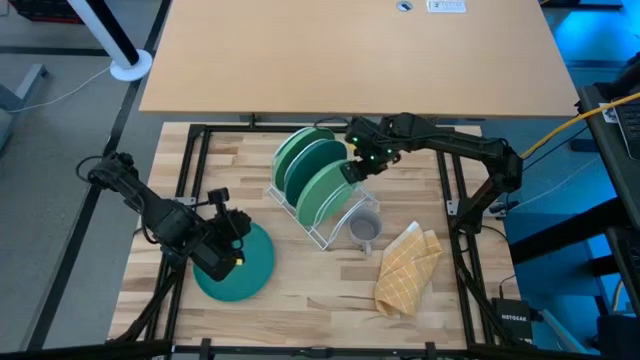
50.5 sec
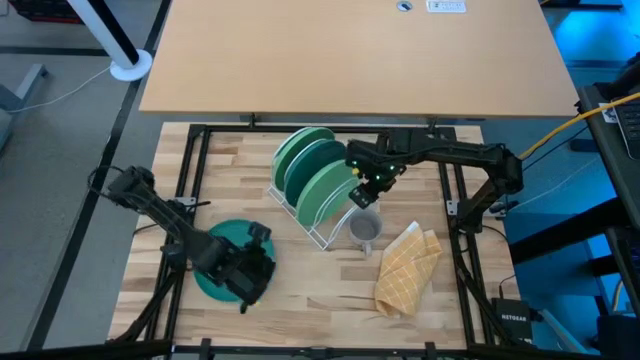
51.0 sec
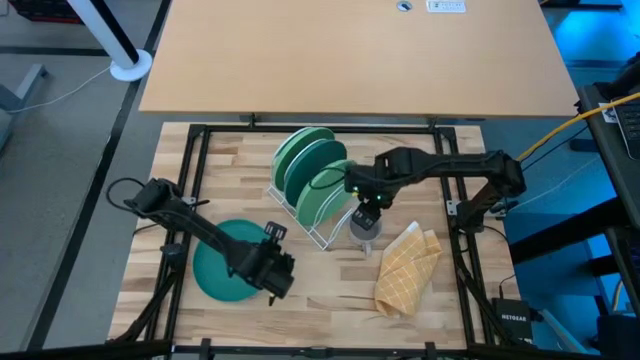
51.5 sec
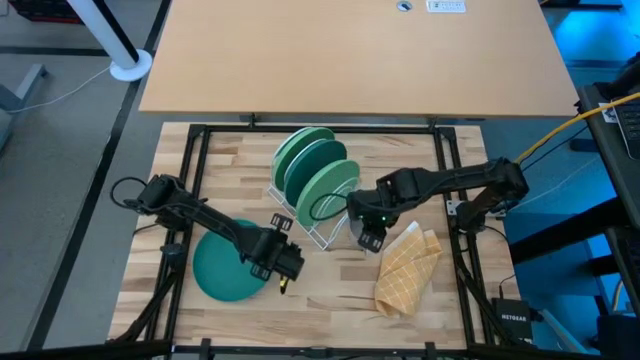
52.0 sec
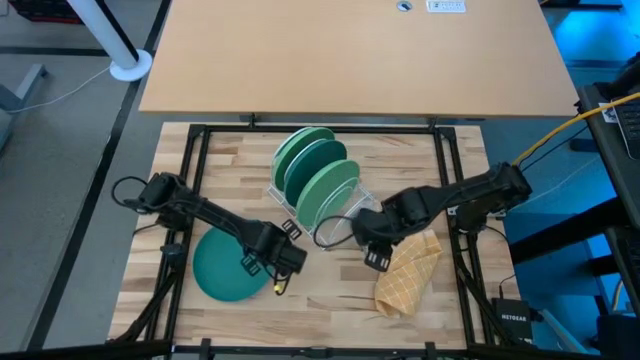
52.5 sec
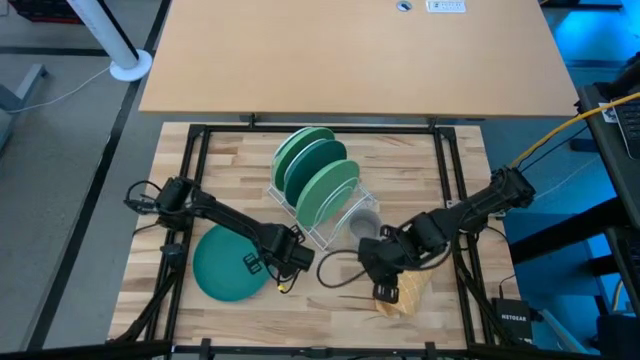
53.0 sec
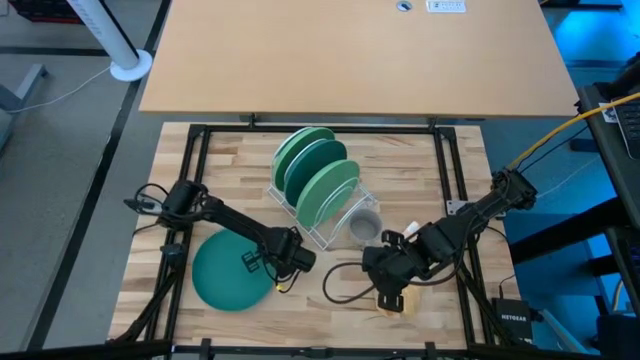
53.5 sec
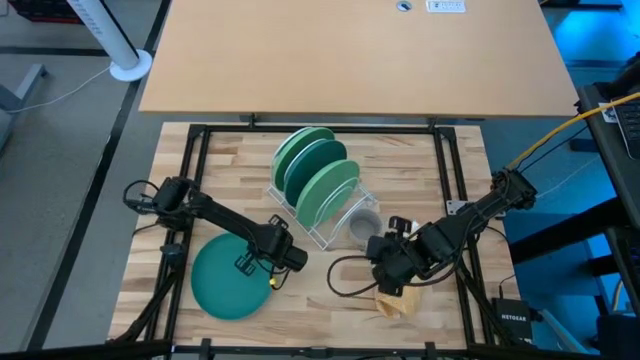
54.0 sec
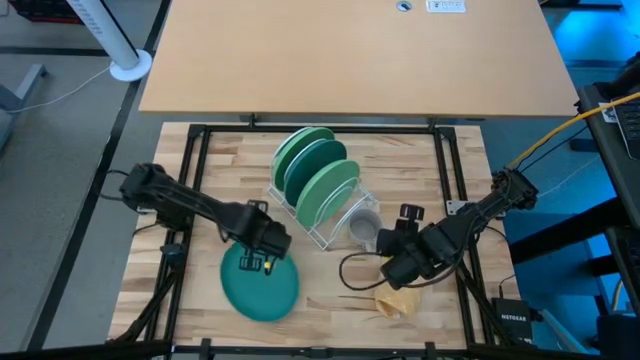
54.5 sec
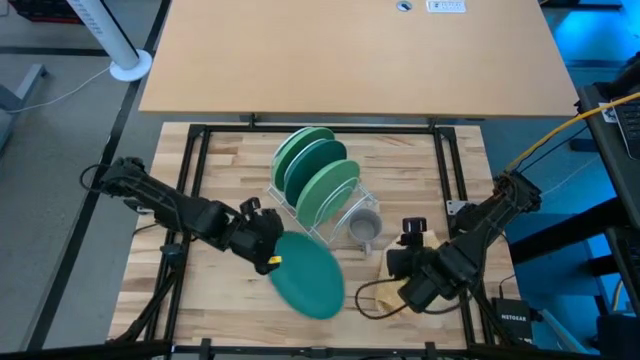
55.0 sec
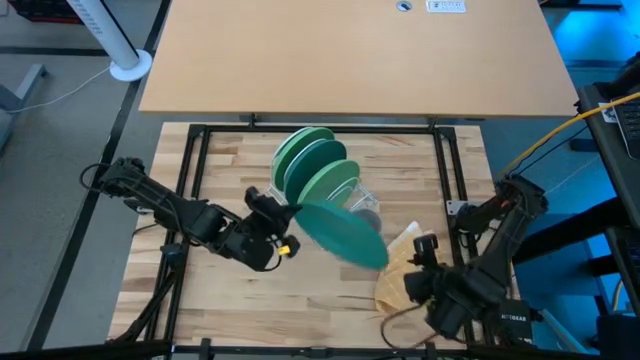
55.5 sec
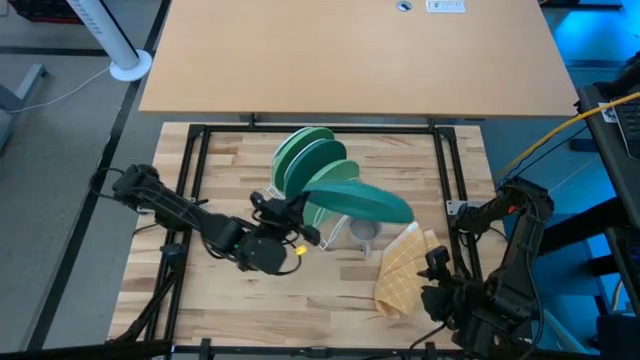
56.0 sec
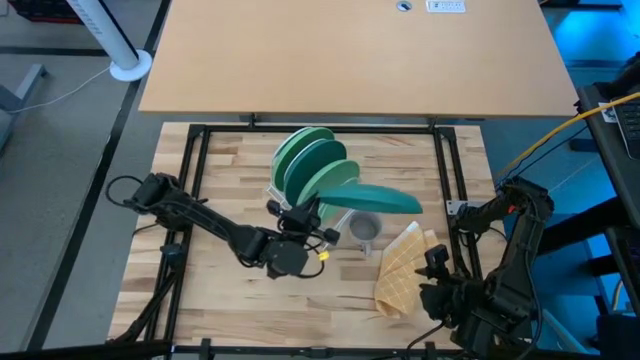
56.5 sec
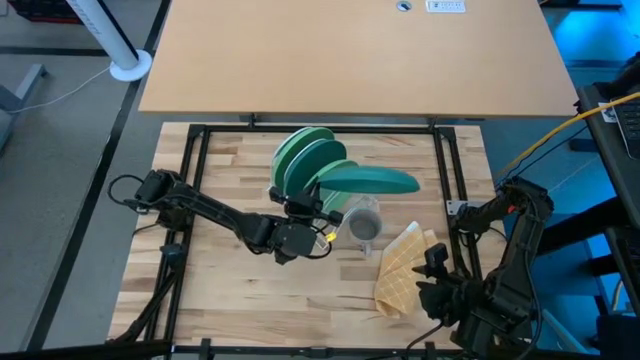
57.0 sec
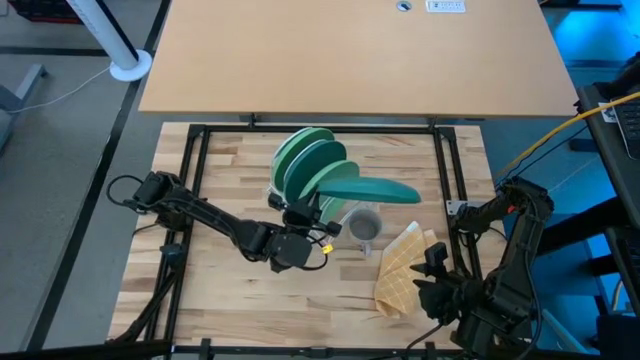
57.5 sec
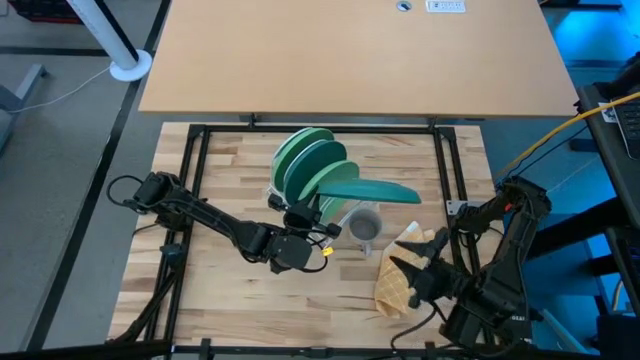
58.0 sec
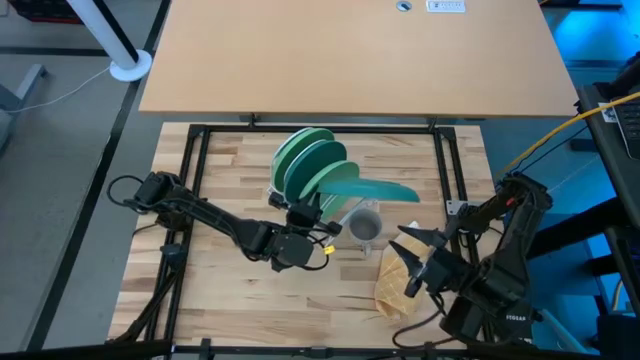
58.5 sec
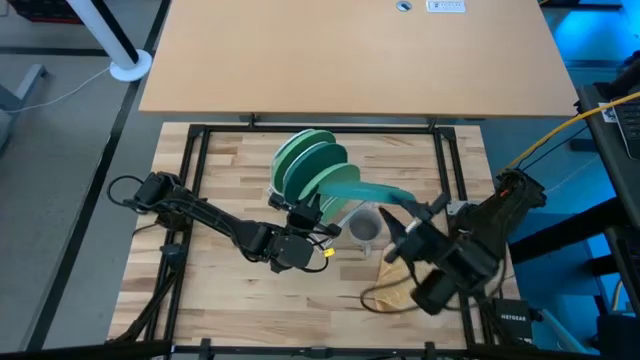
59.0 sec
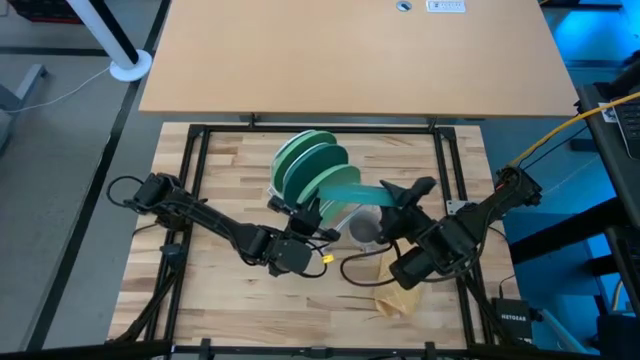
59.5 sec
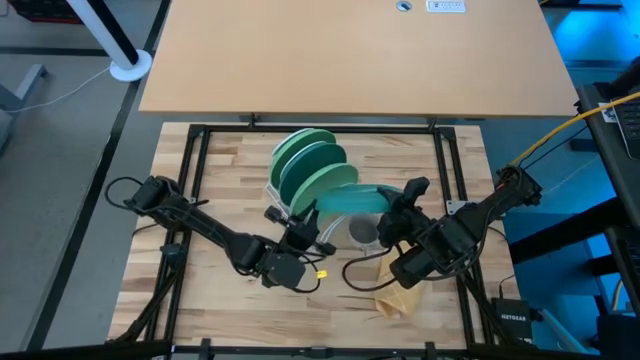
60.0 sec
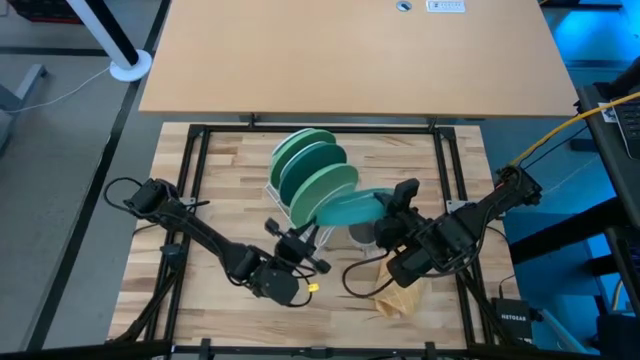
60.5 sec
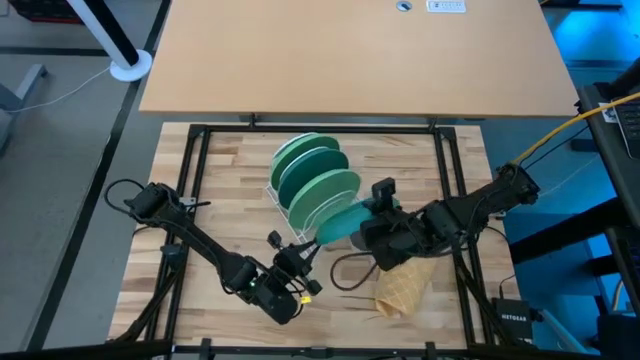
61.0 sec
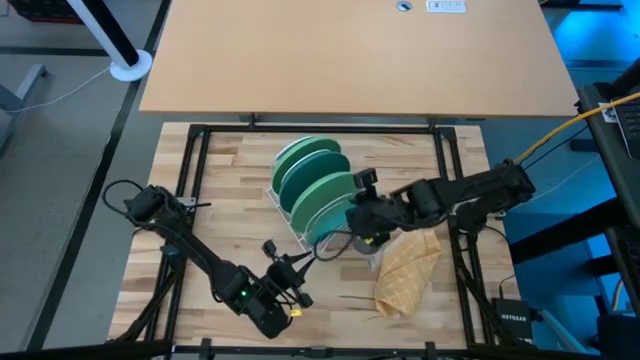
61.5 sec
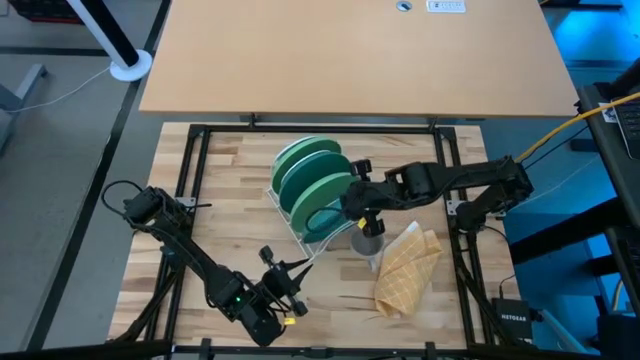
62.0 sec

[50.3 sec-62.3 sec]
Task: Sort dishes
Put the blue plate into the white dish rack

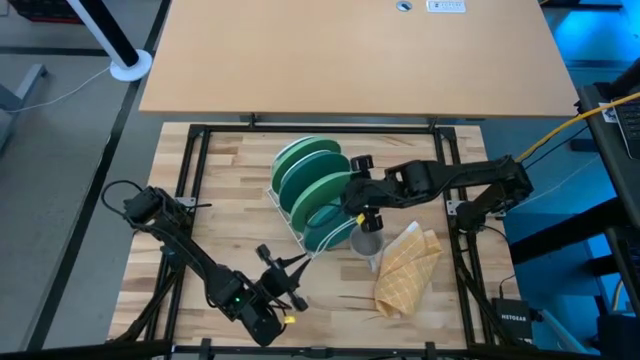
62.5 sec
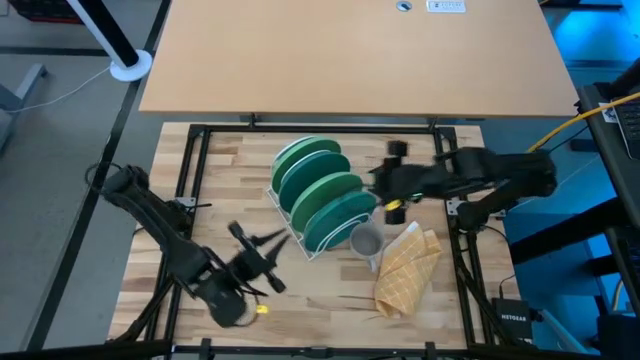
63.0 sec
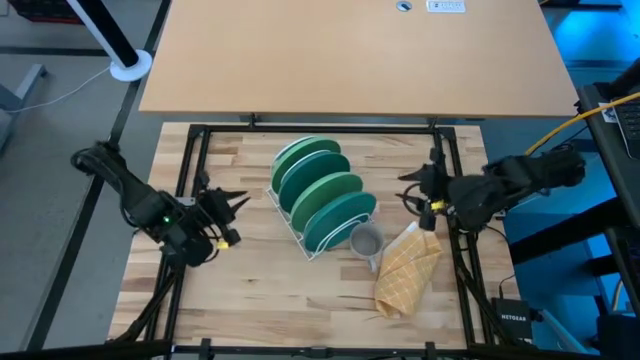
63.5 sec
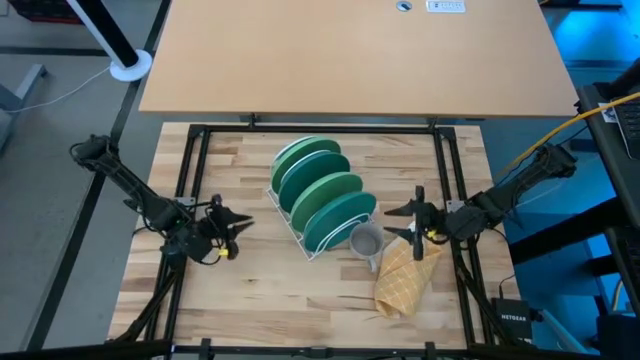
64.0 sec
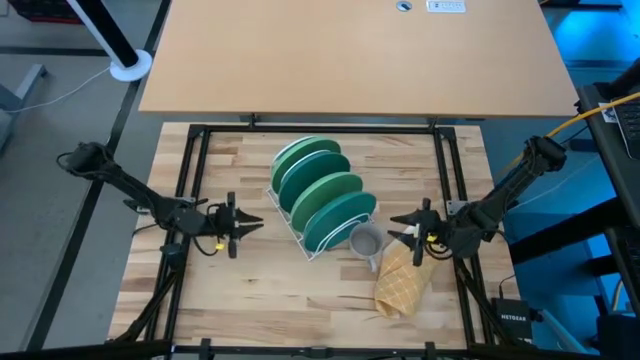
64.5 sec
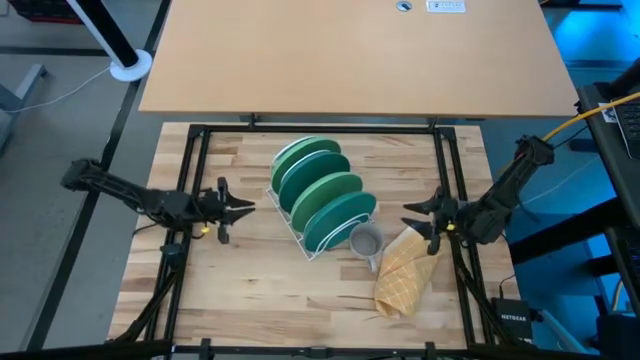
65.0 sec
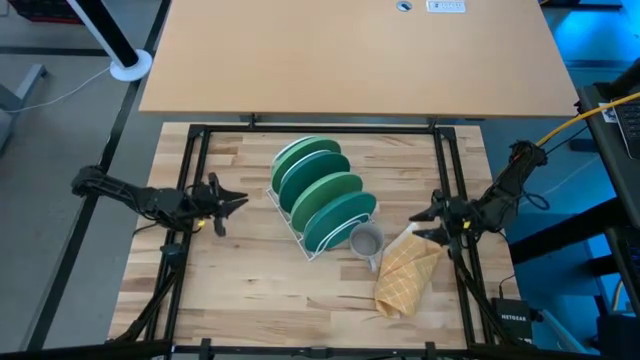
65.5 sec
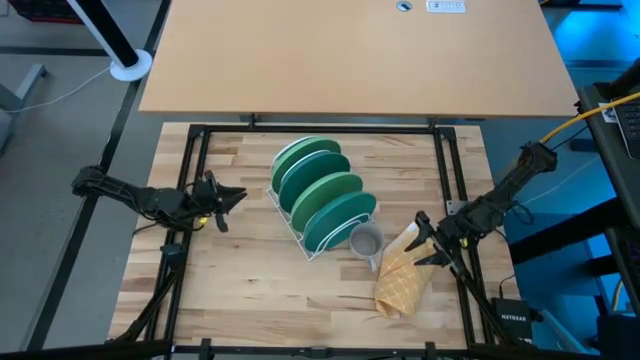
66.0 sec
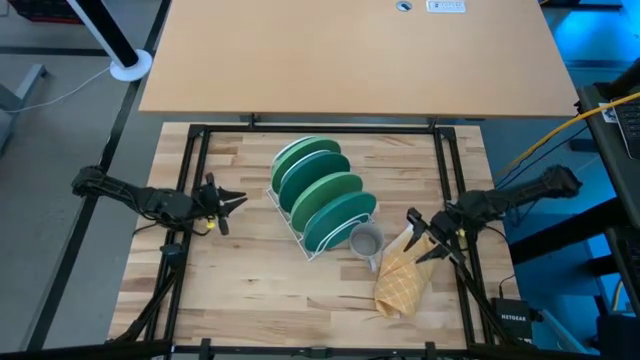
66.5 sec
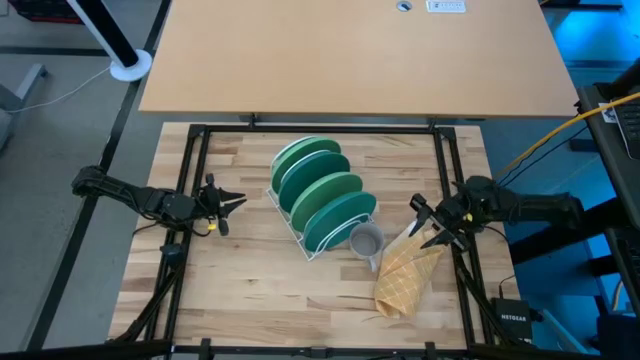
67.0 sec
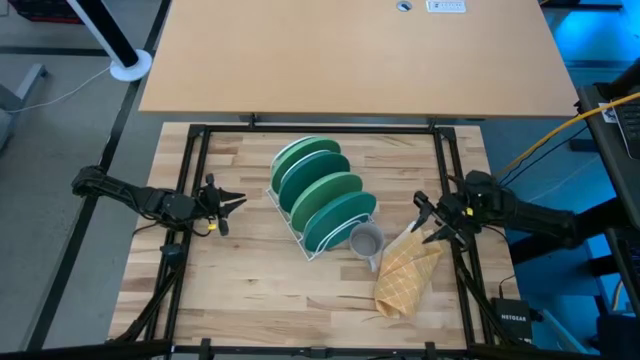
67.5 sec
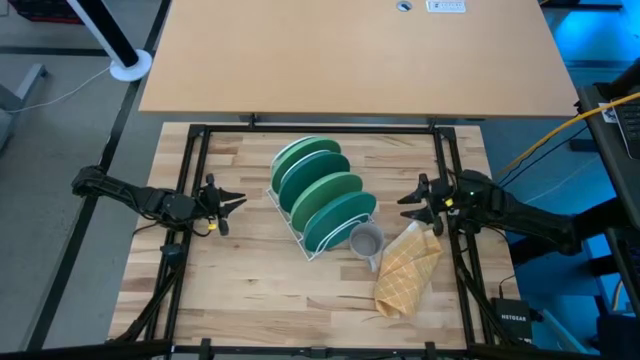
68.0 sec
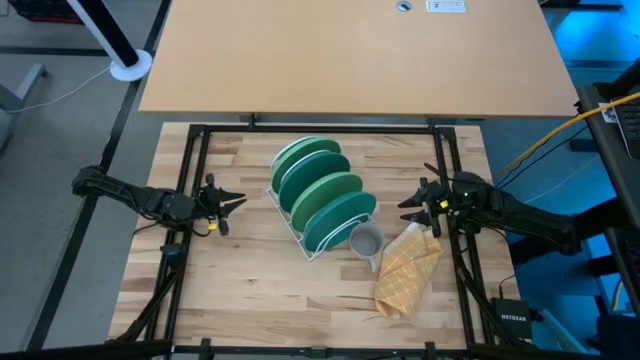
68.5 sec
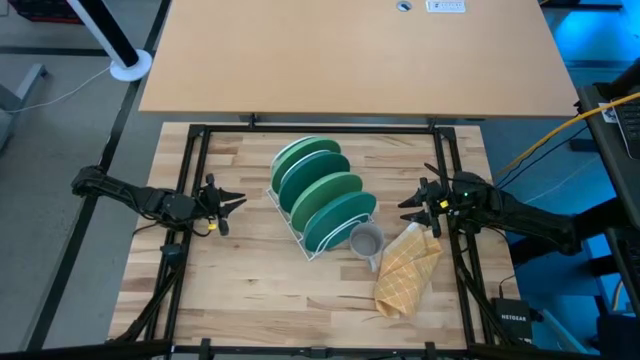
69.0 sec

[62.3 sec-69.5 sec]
Return to Home Position

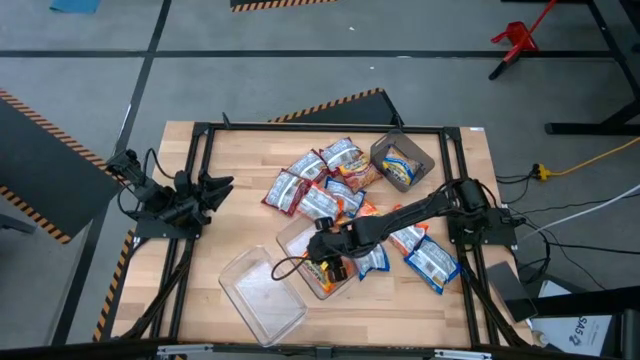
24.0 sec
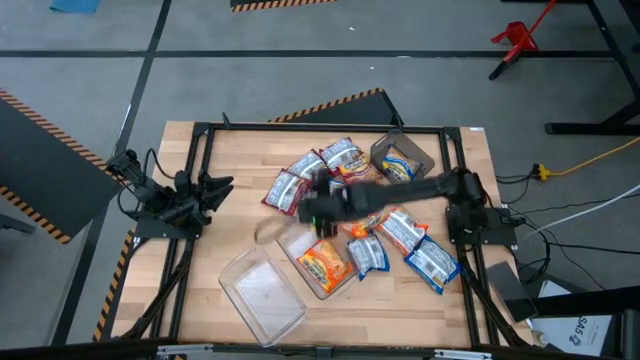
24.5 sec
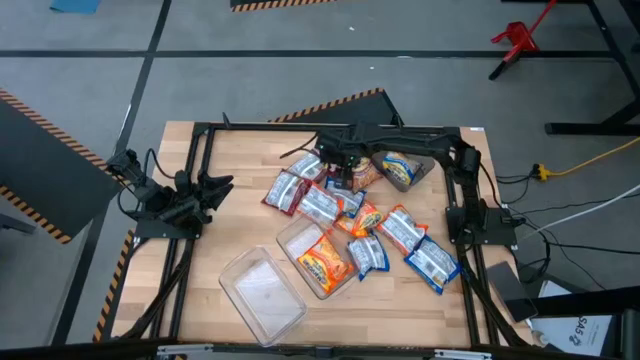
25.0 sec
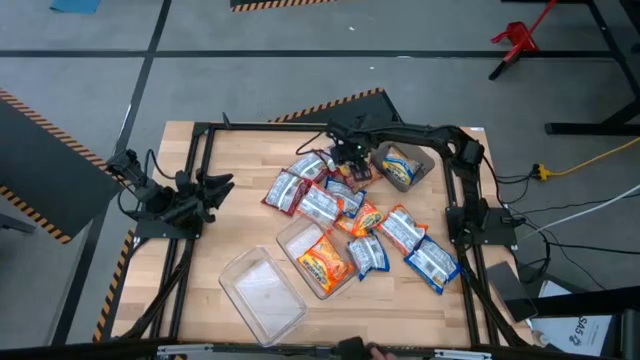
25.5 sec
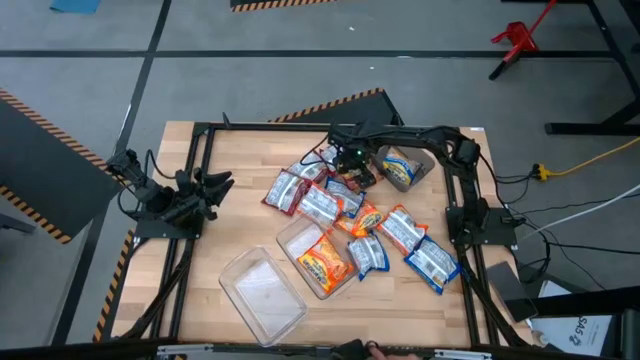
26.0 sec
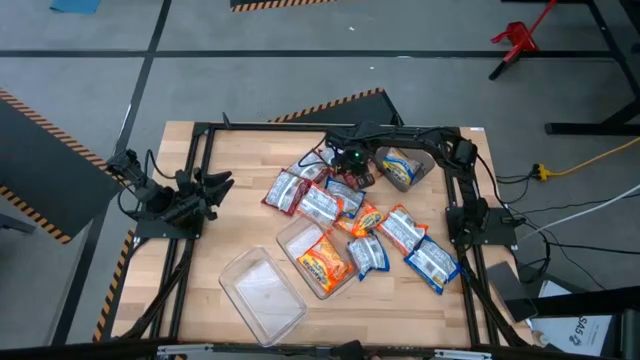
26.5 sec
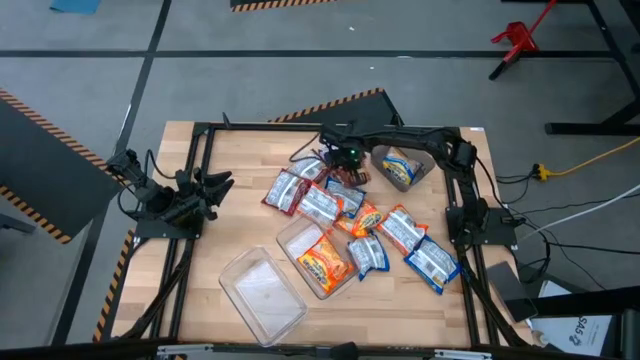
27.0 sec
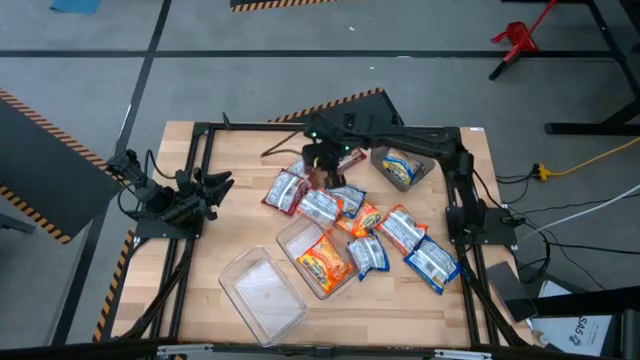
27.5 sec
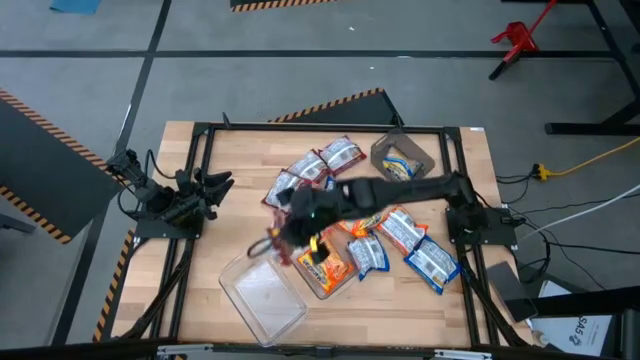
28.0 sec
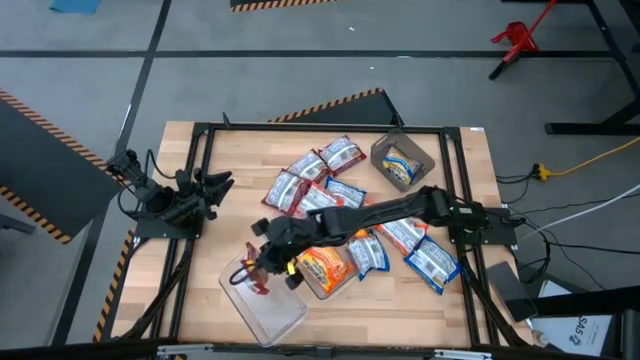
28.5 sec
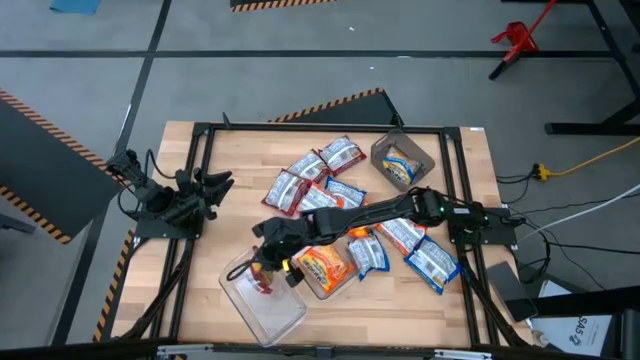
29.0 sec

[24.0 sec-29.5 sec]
Task: Sort Maruchan noodles
Put the red noodle pack into the bottom transparent bin
